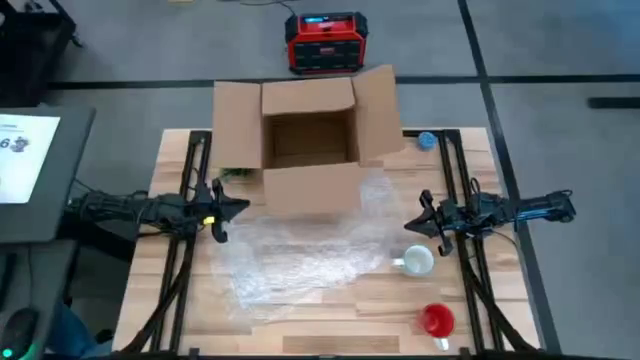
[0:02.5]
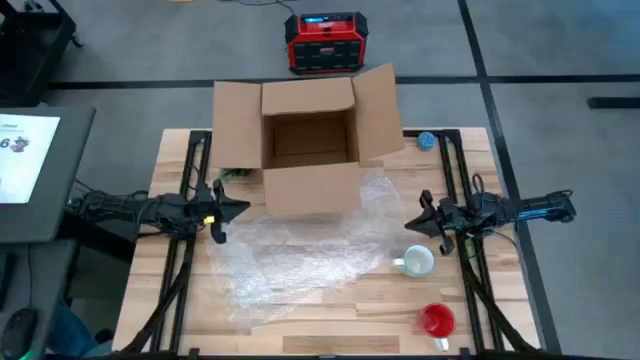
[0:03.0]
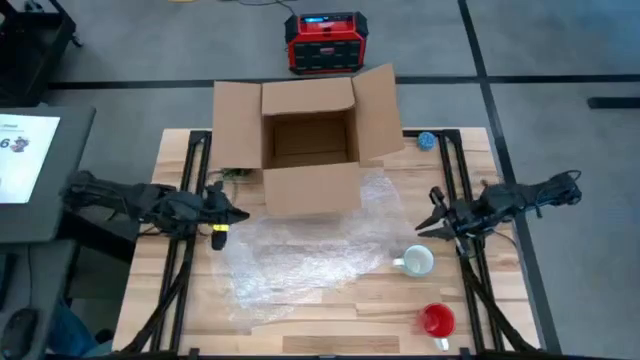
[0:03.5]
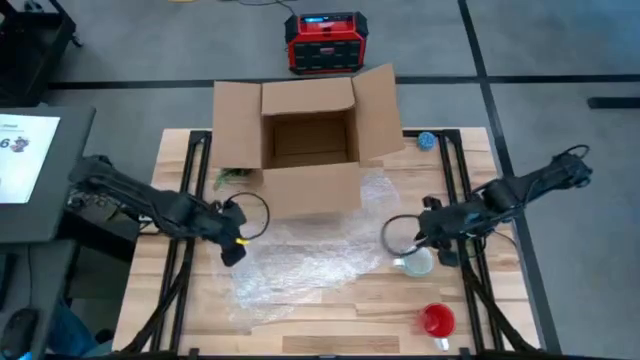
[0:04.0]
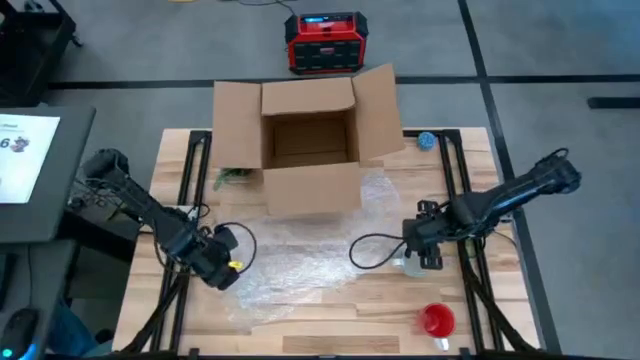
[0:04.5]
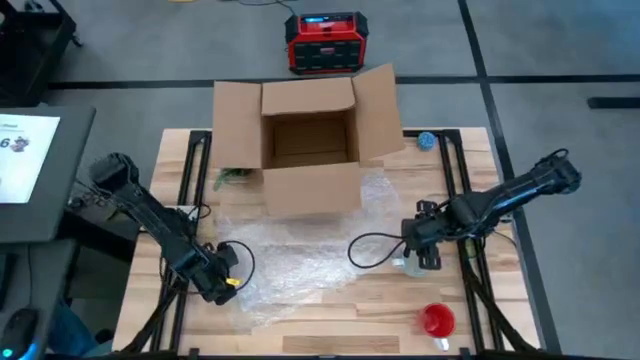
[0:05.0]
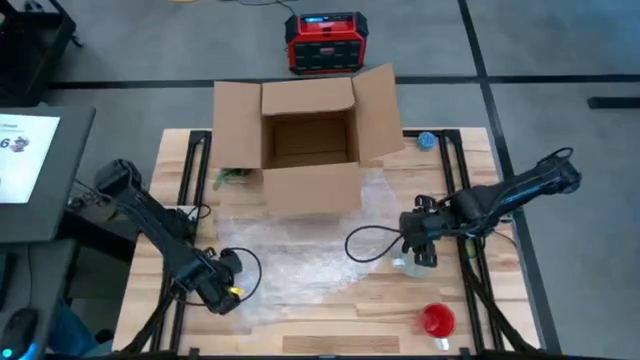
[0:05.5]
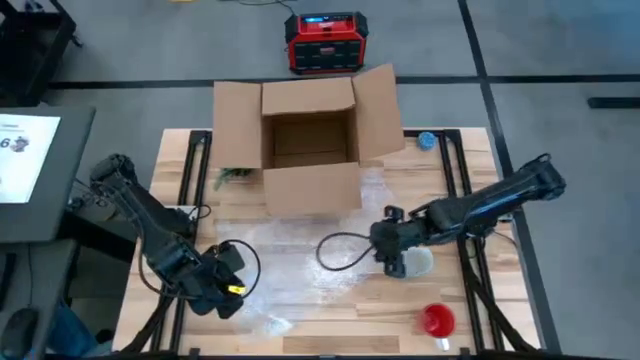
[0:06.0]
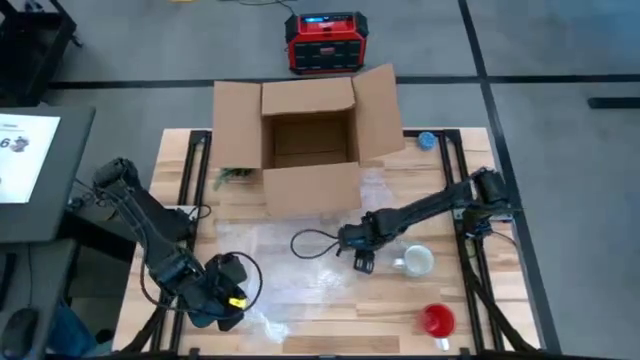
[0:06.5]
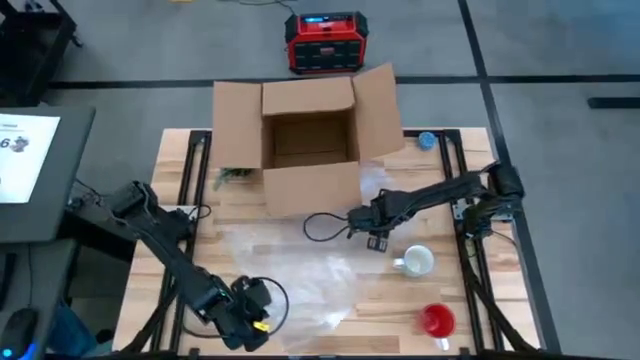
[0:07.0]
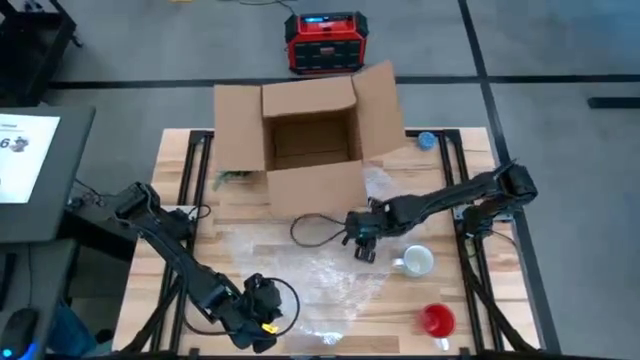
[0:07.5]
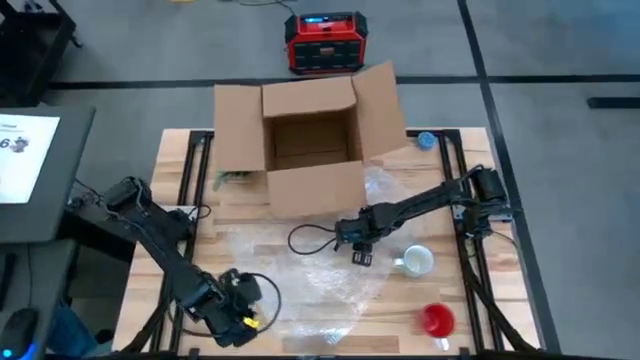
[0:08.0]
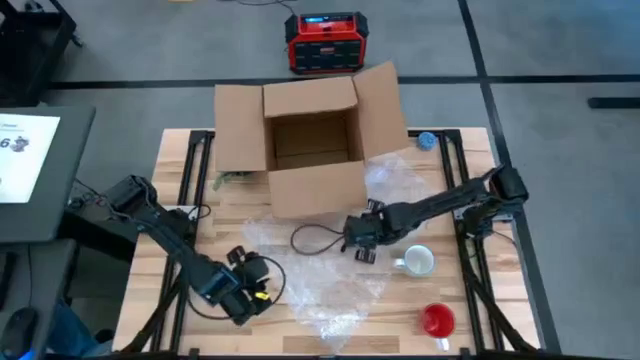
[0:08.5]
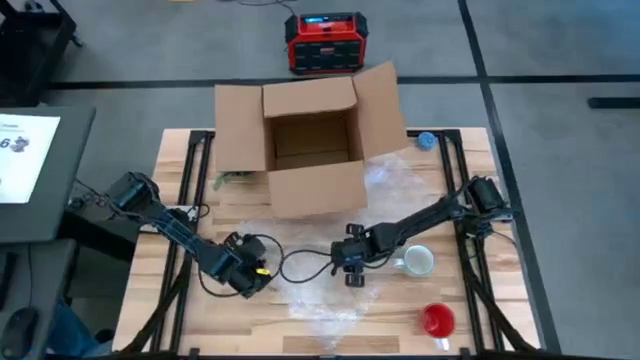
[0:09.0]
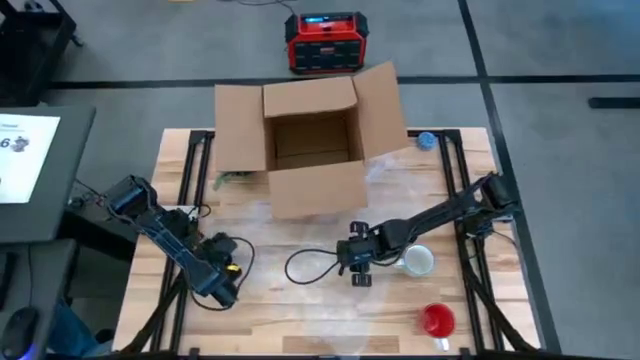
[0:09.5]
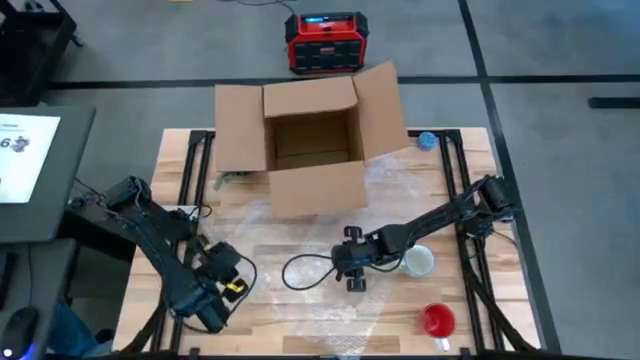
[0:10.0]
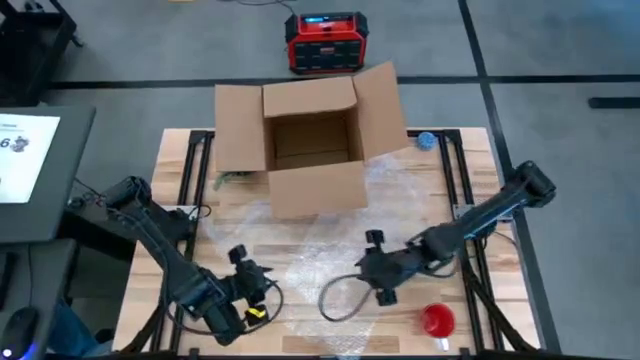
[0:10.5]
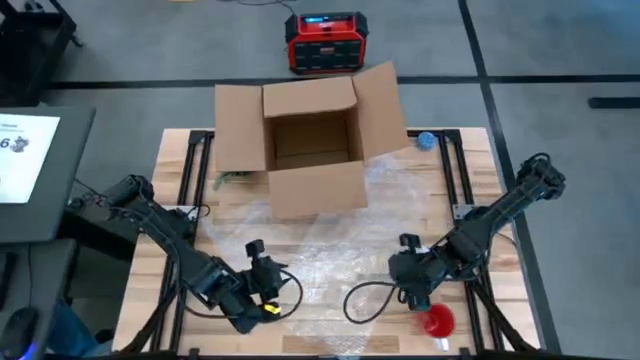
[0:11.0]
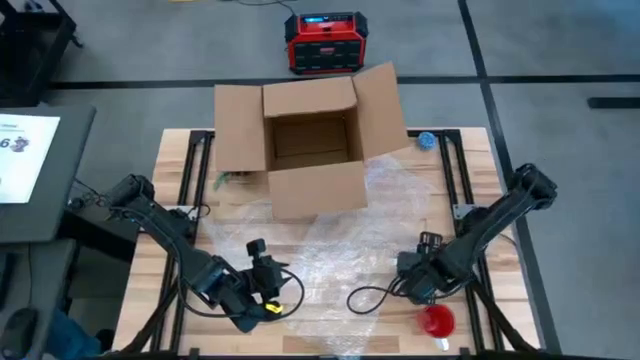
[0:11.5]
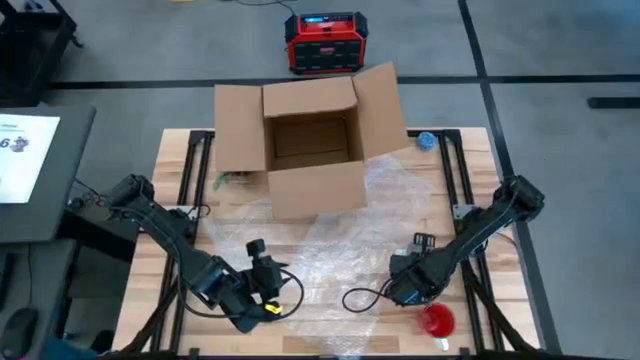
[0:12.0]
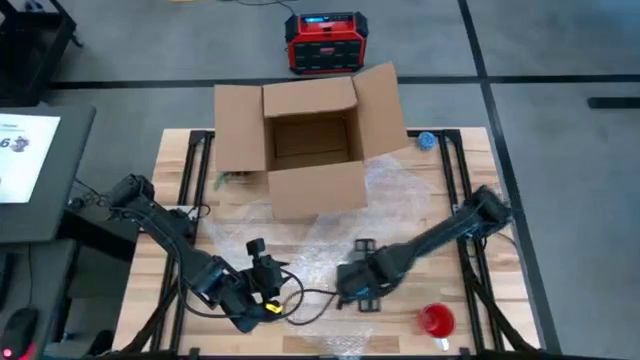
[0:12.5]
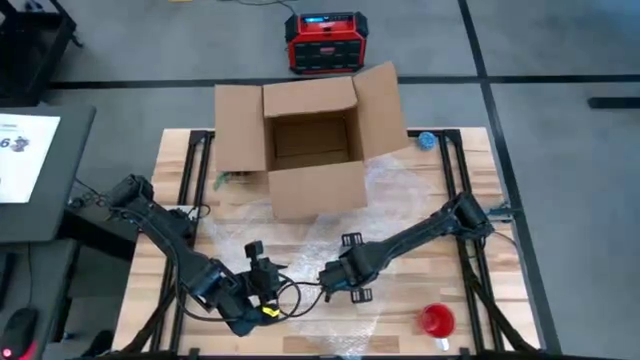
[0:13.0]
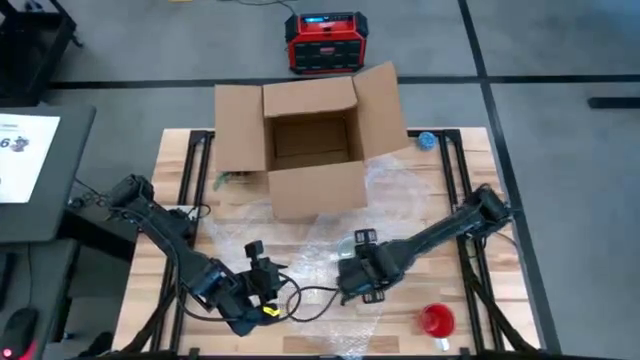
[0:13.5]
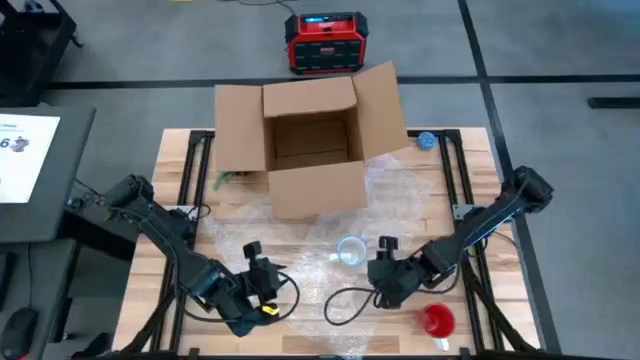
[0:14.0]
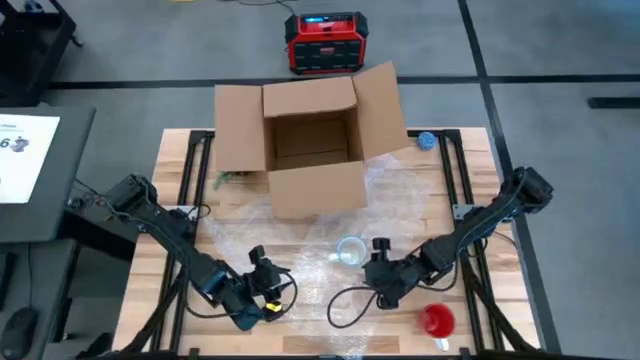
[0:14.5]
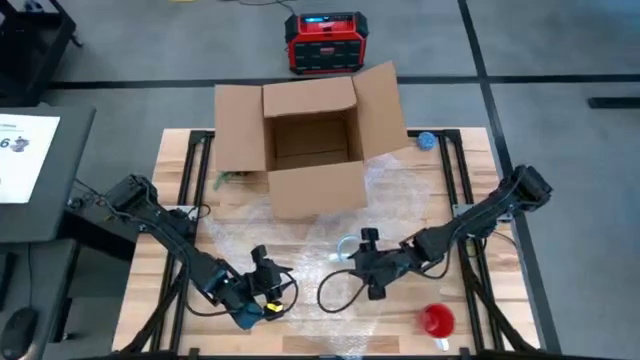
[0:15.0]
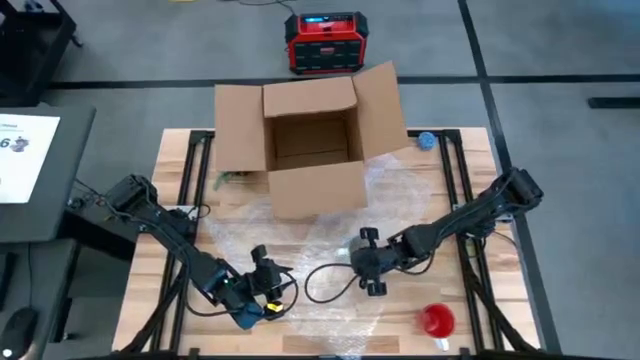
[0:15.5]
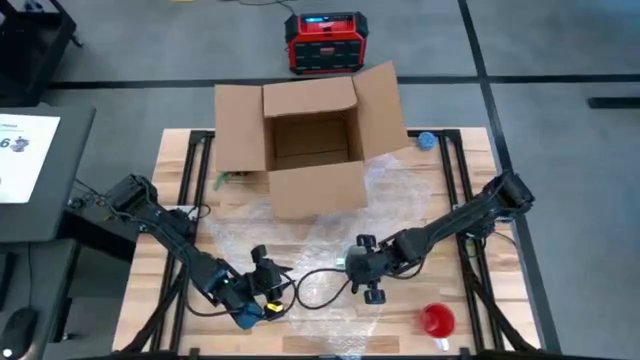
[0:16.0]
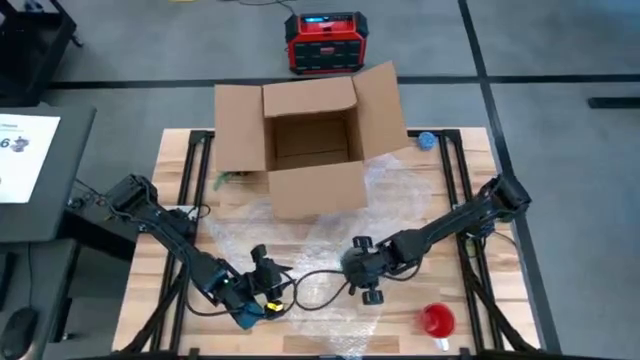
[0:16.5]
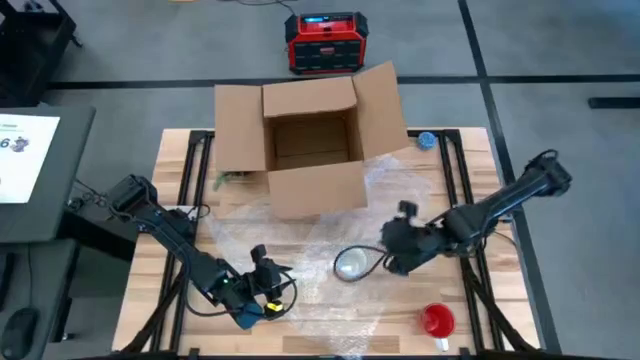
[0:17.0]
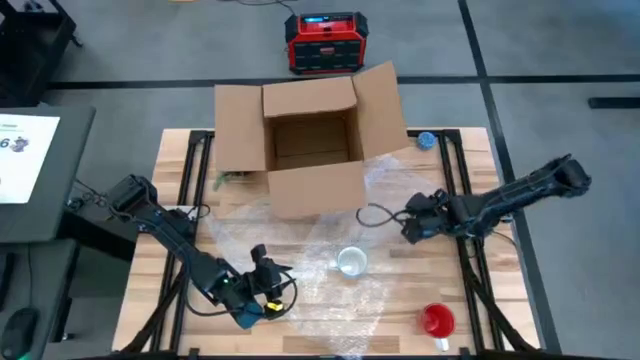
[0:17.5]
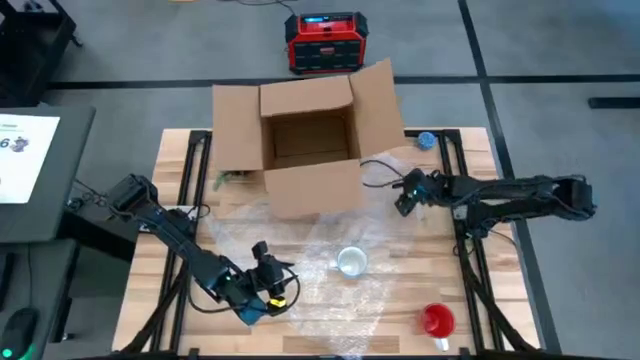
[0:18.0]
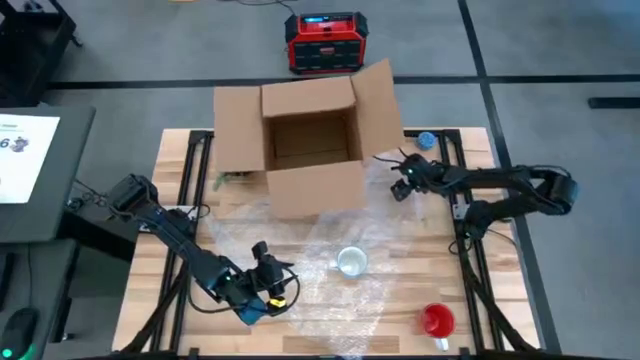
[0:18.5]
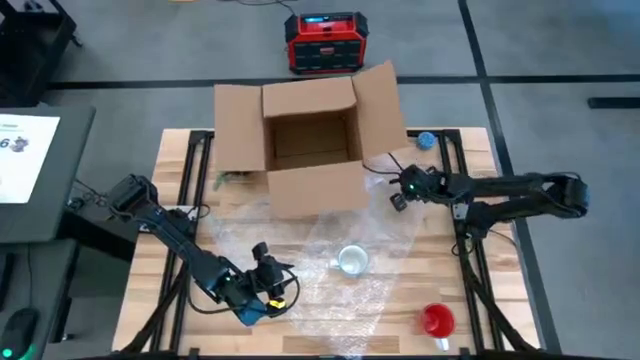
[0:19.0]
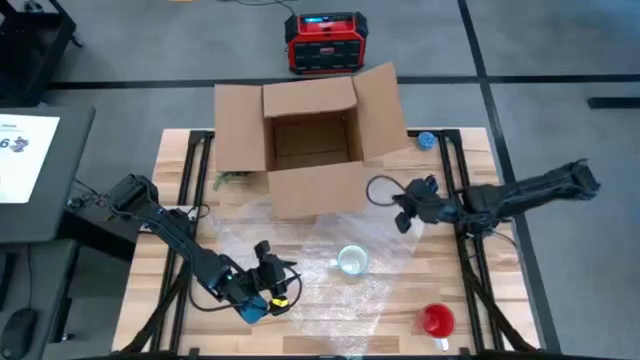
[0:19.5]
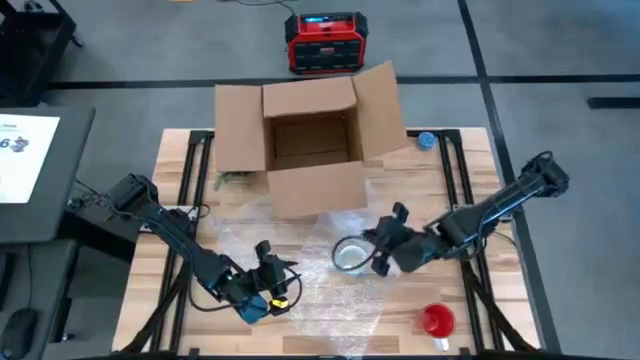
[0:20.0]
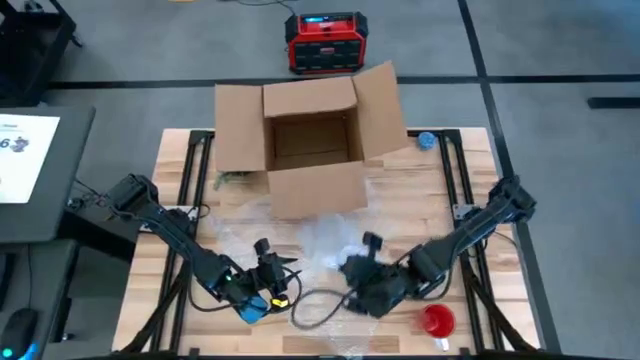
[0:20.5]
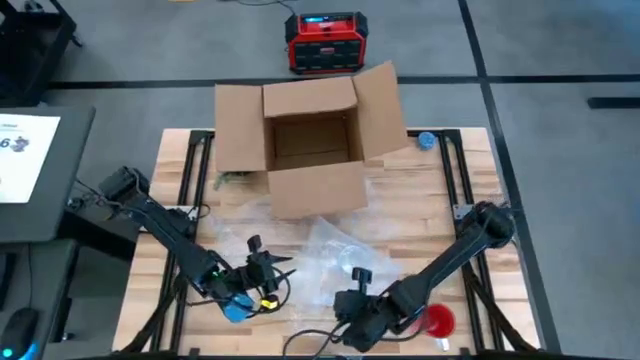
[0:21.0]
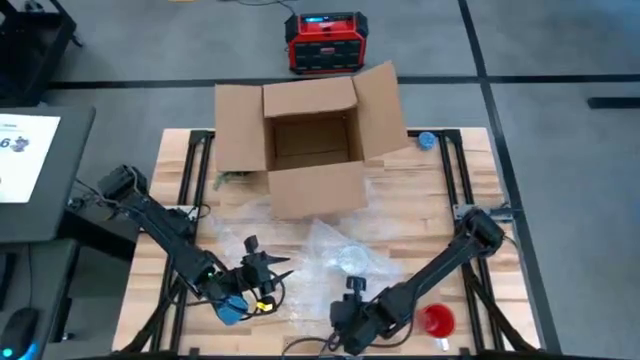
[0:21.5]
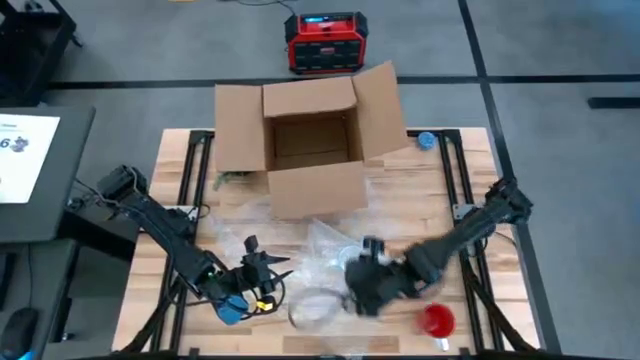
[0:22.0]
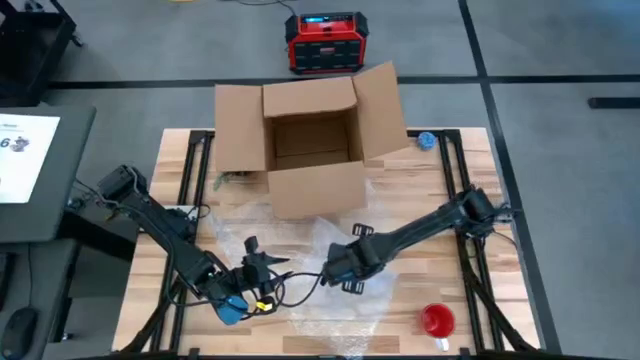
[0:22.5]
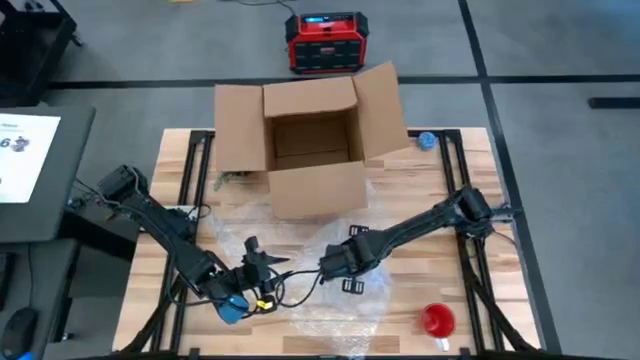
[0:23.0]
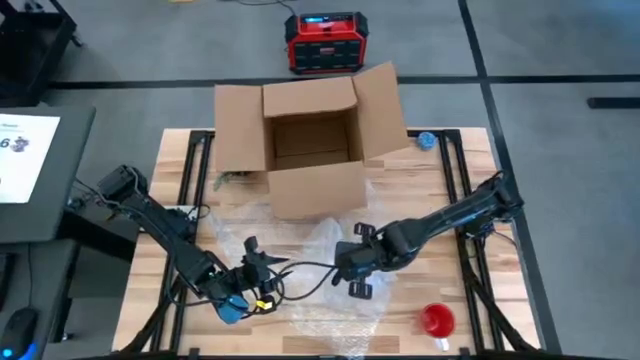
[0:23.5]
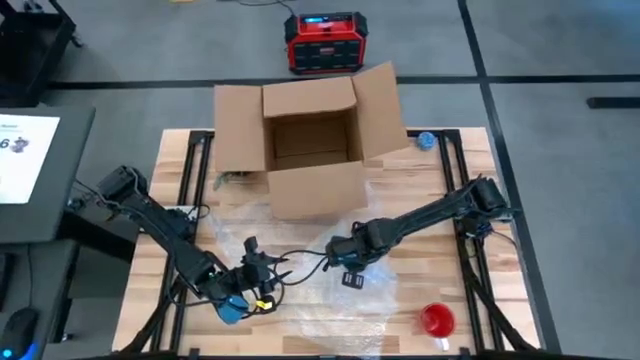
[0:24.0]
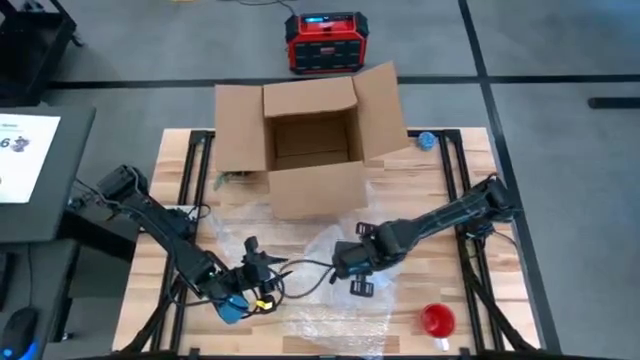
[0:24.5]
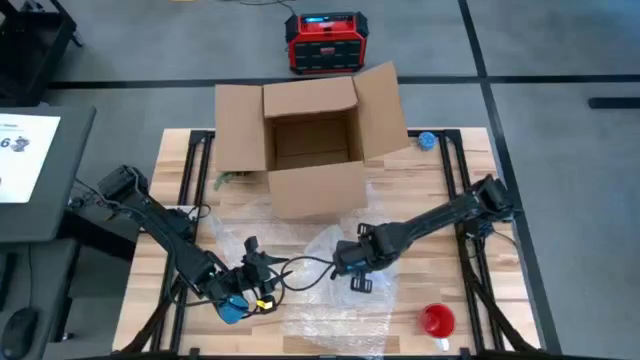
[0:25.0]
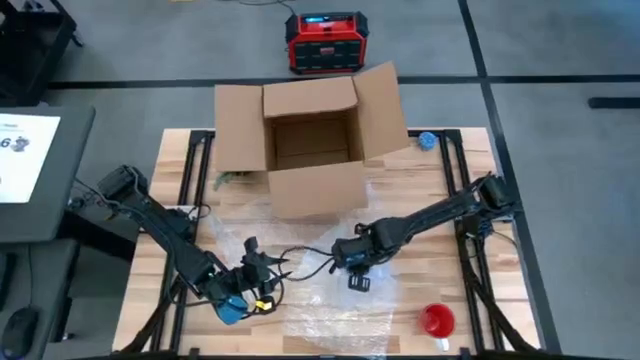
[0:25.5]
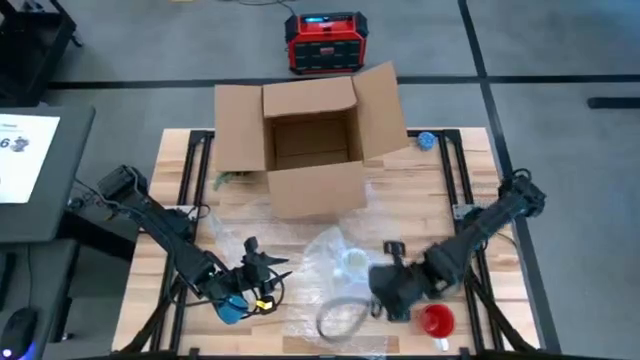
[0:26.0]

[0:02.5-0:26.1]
Task: wrap mug
Wrap the green patterned mug into the bubble wrap
